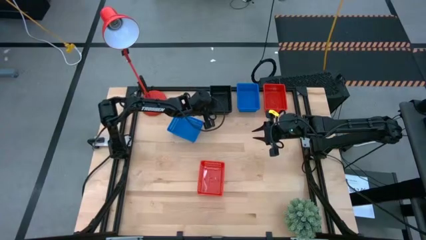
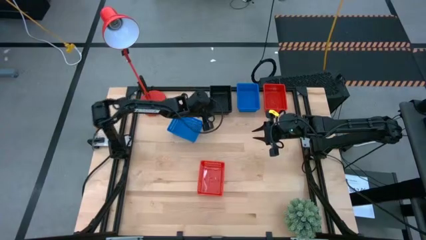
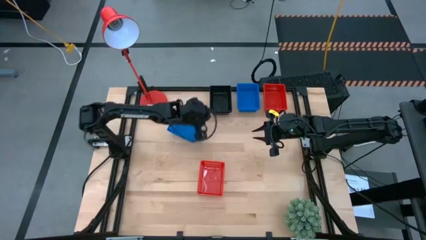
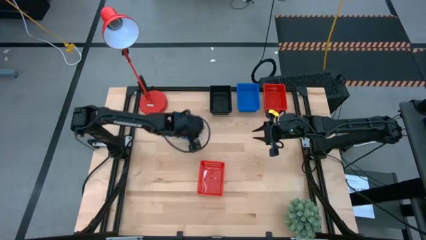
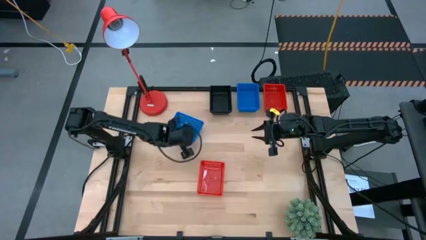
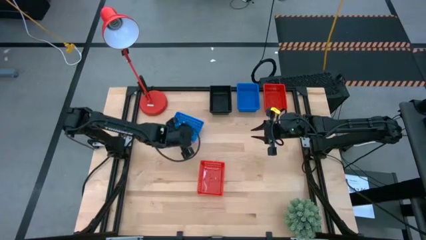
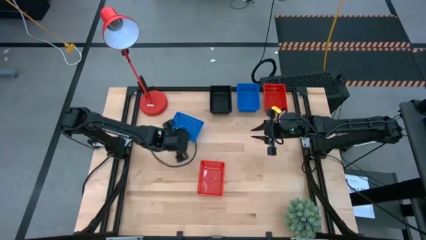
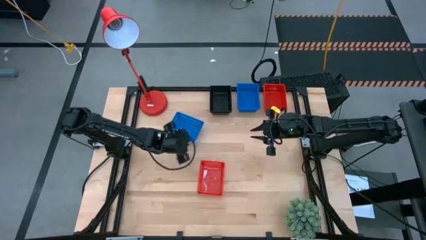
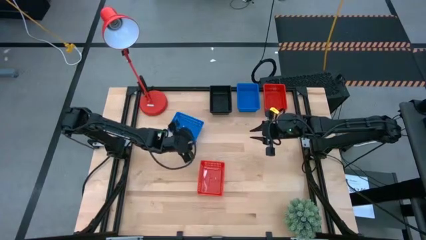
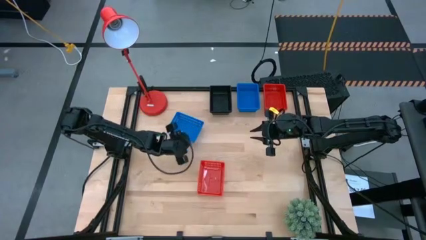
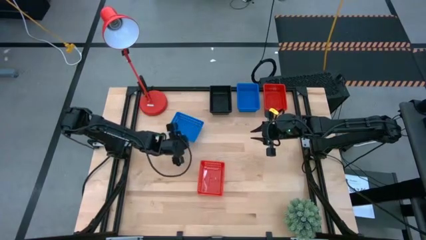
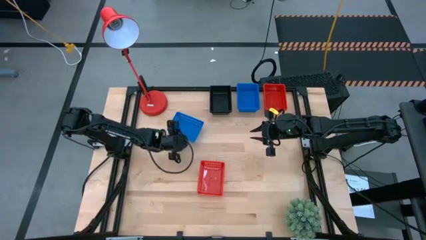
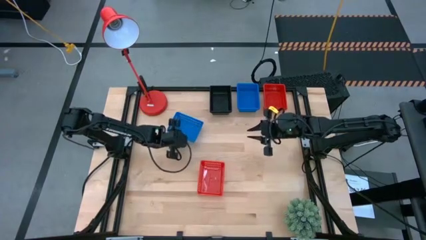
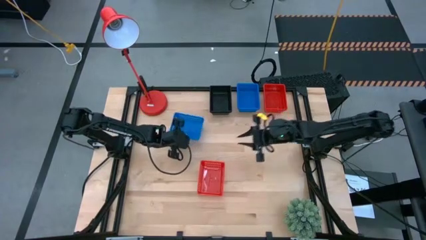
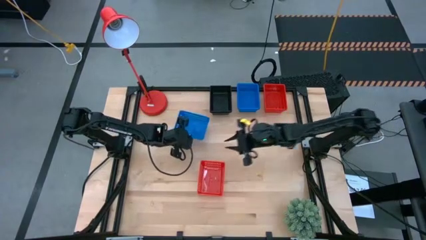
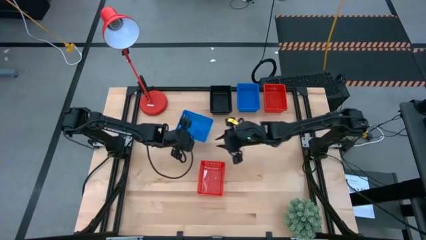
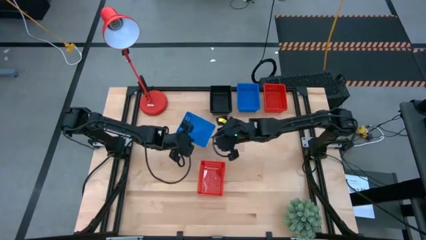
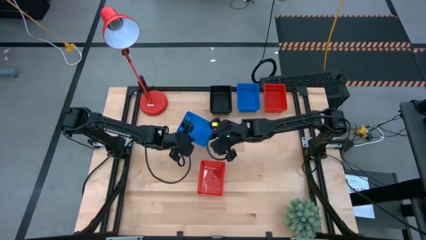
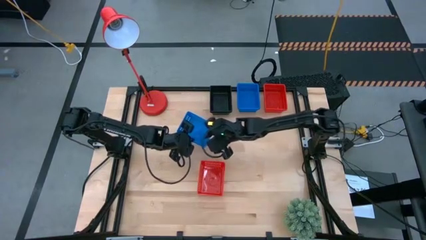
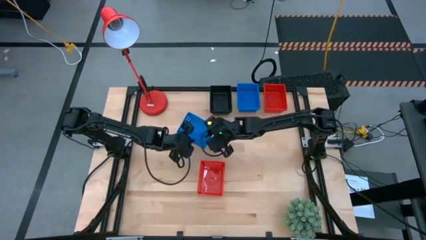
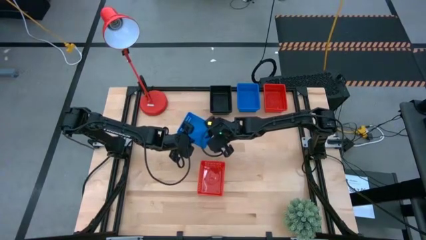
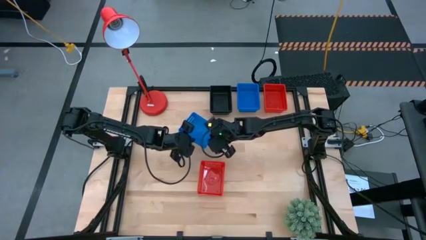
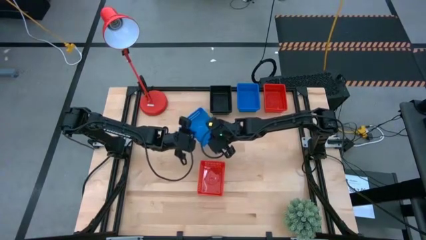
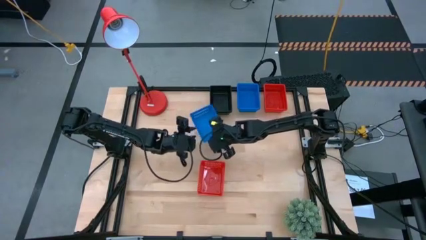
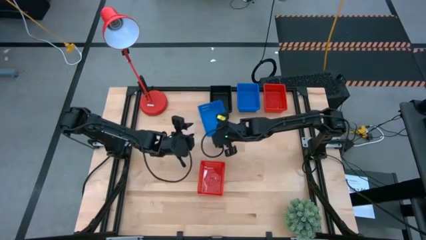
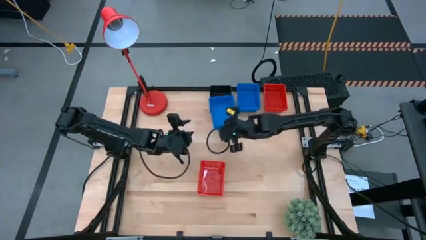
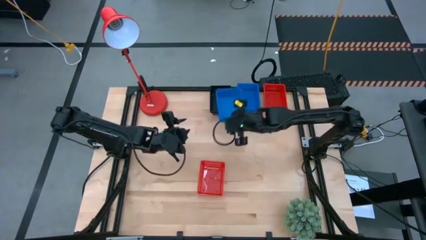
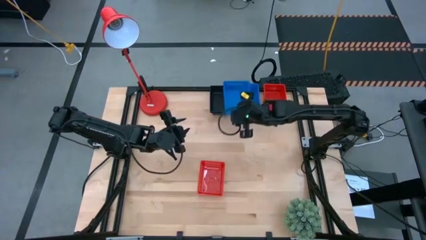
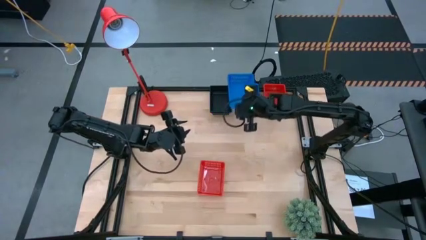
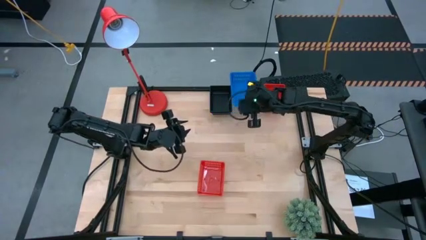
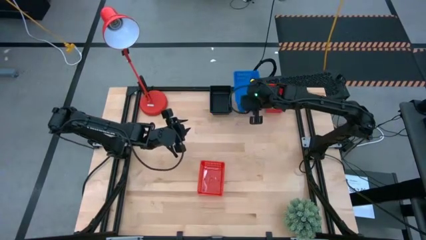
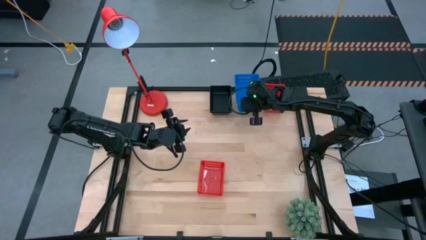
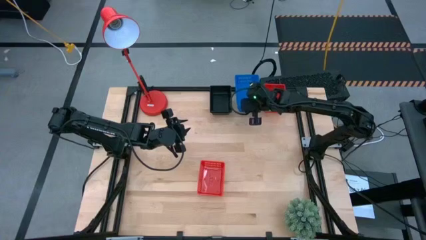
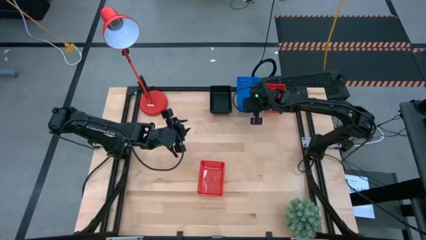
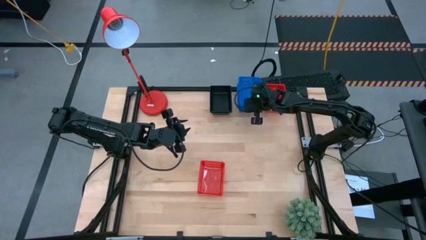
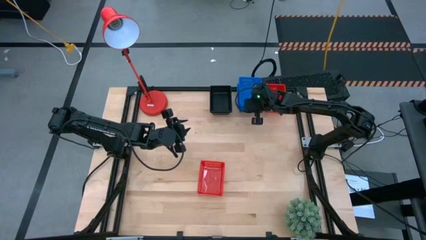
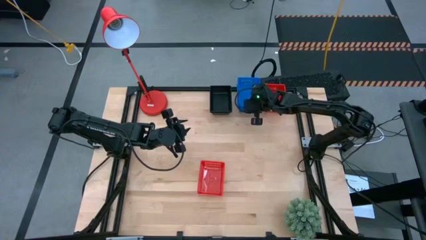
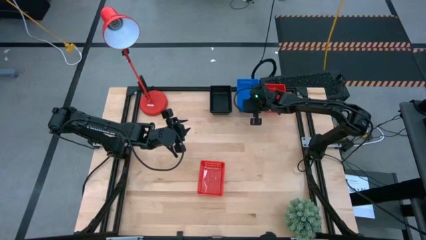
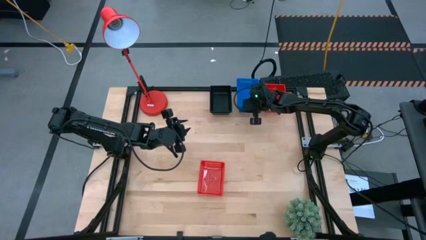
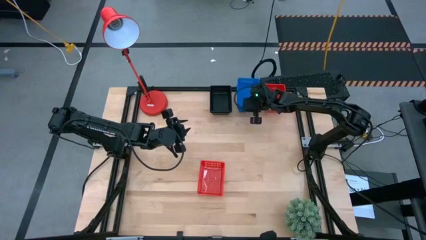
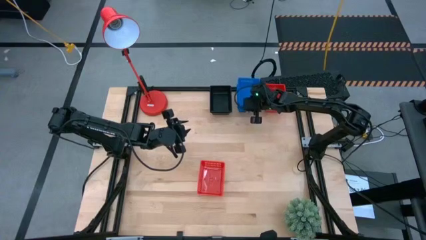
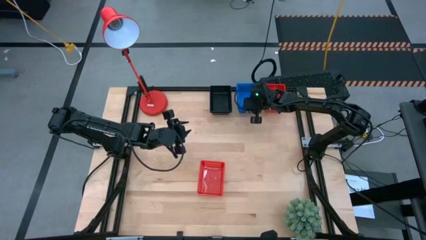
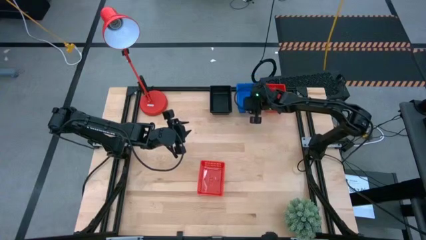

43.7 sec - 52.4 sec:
Stack the bottom blue basket on top of the top blue basket

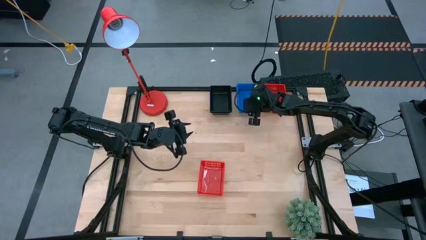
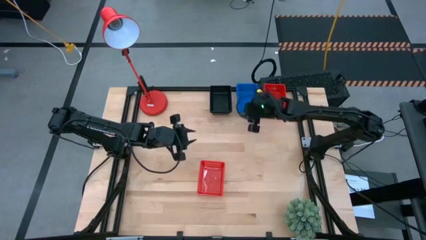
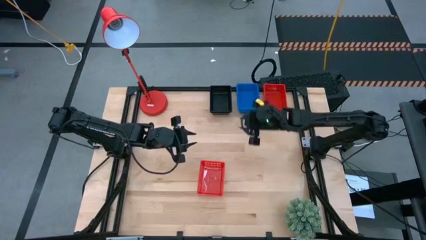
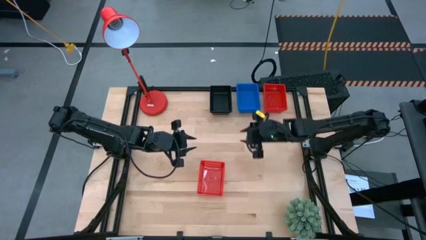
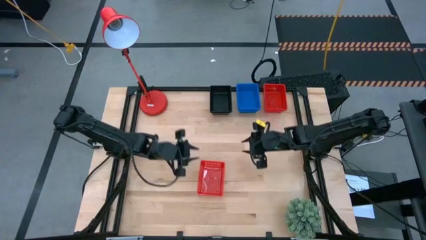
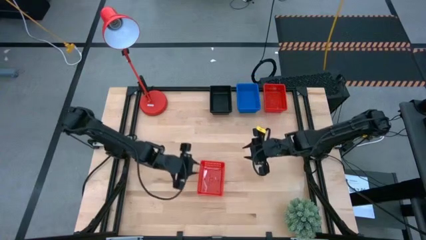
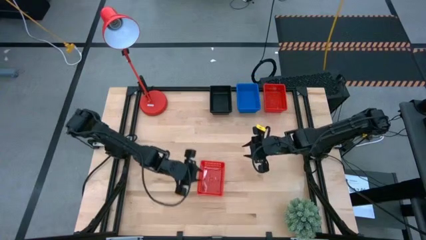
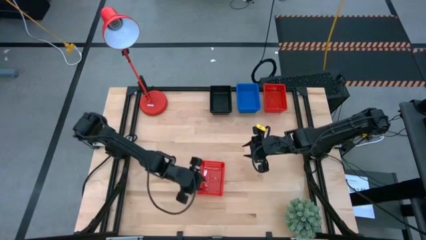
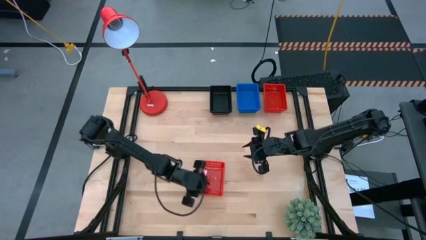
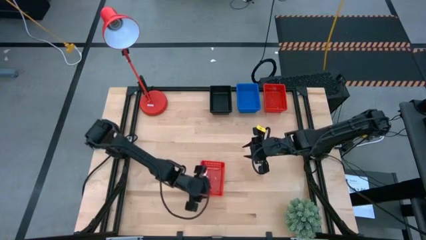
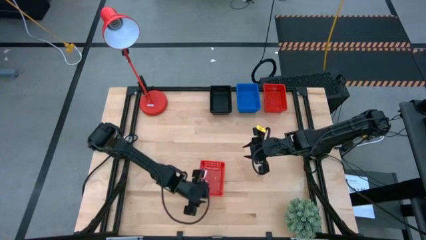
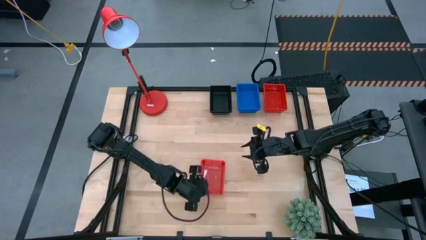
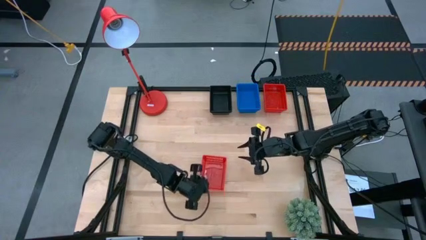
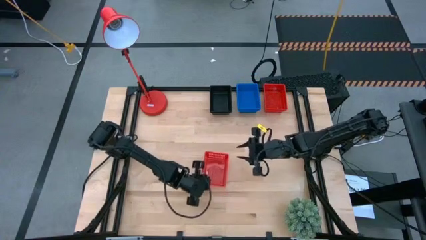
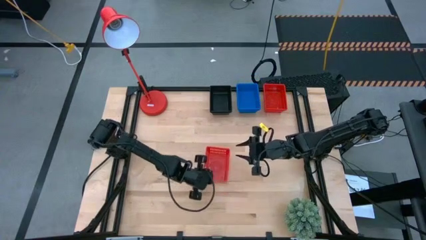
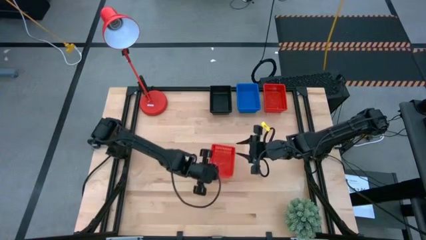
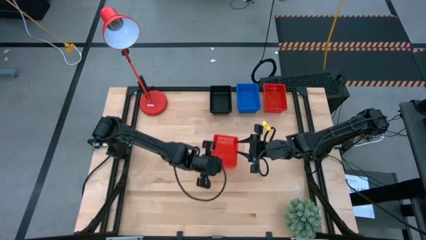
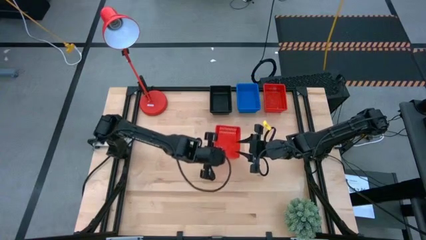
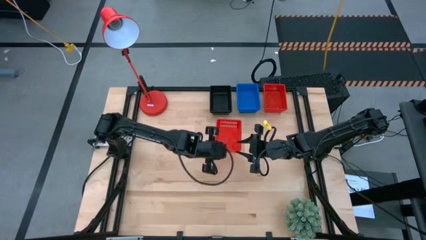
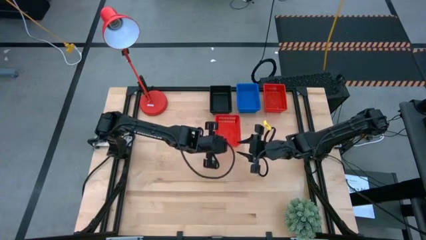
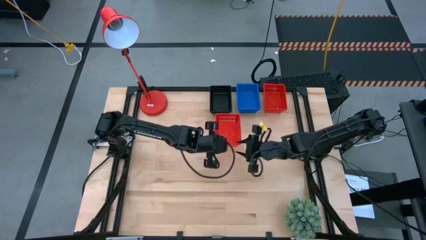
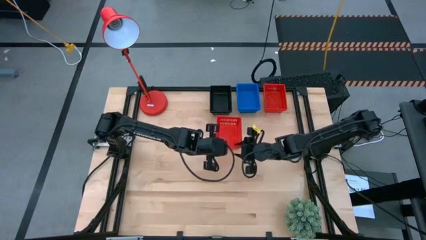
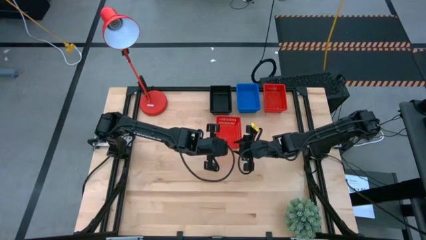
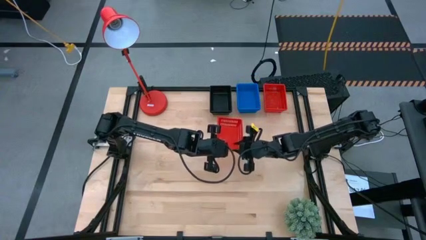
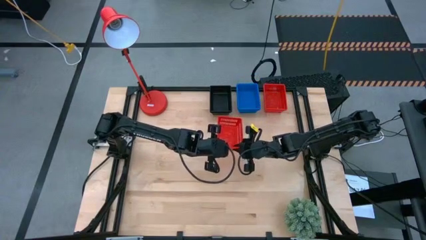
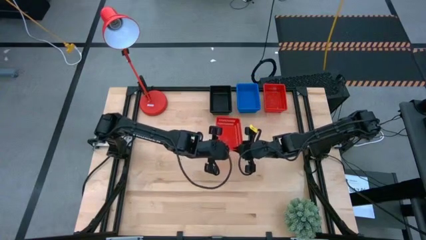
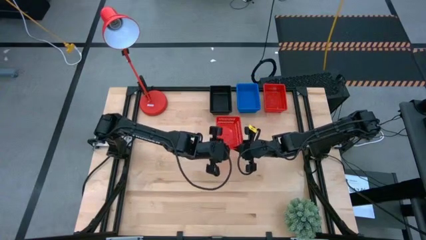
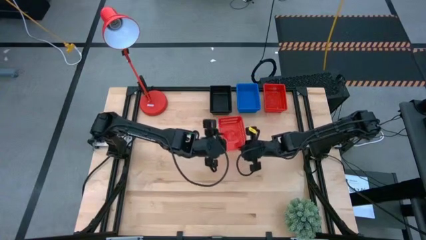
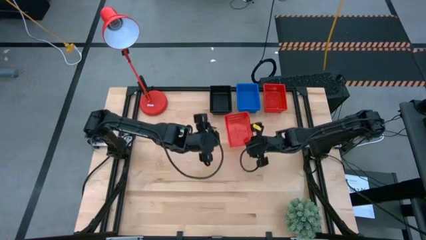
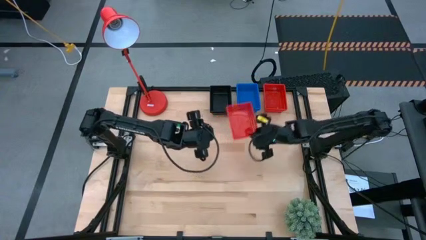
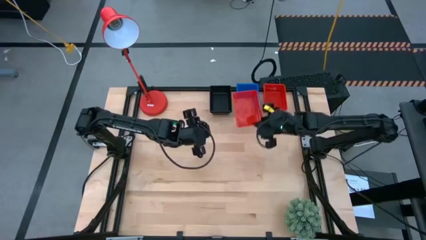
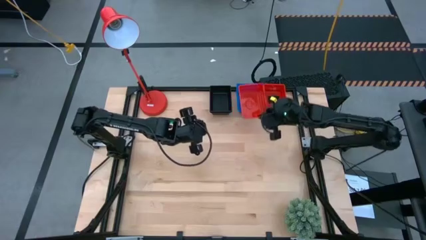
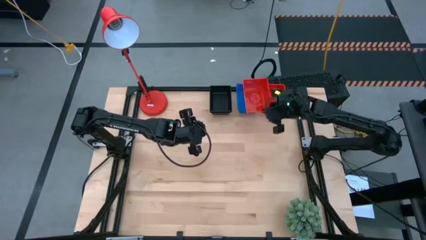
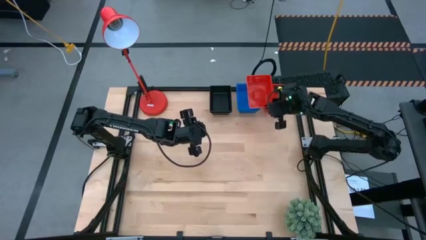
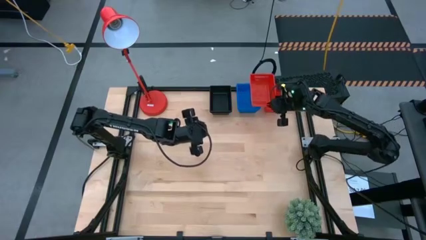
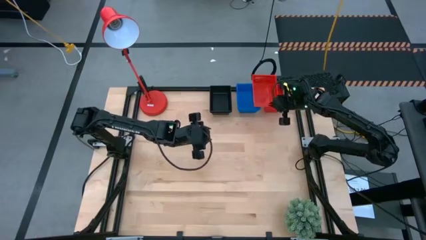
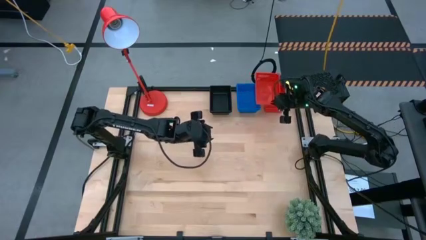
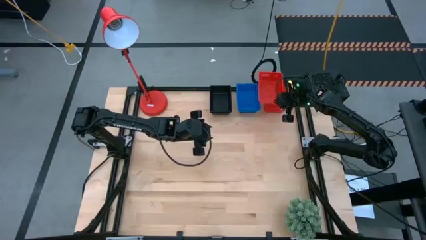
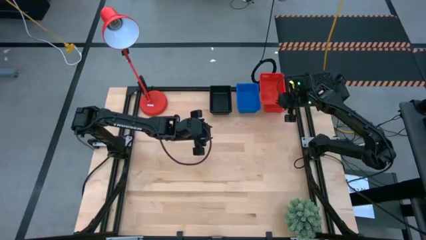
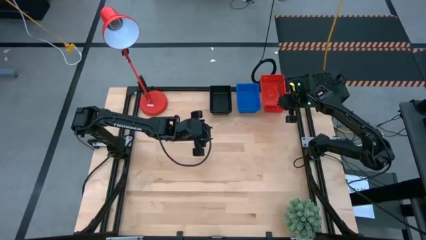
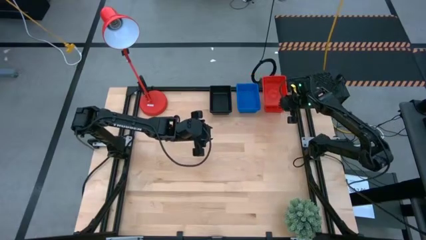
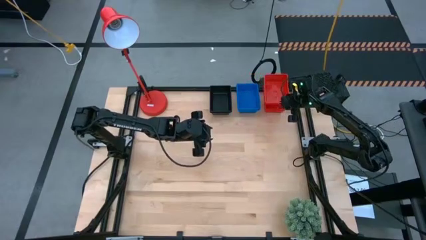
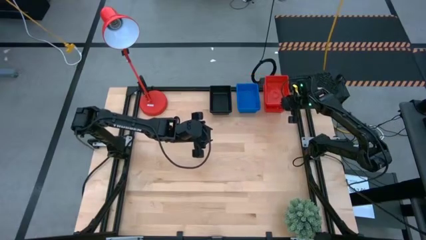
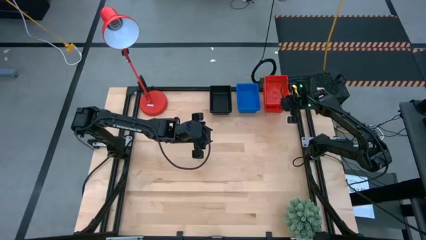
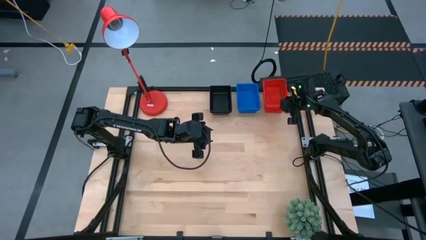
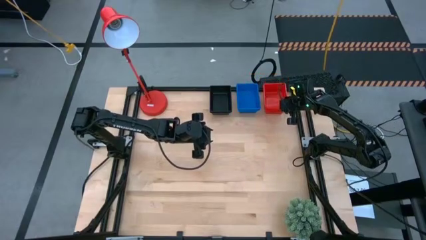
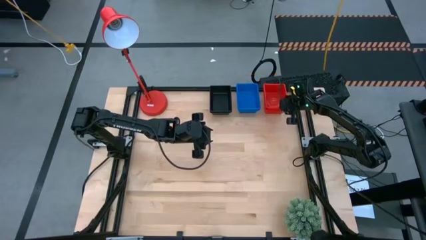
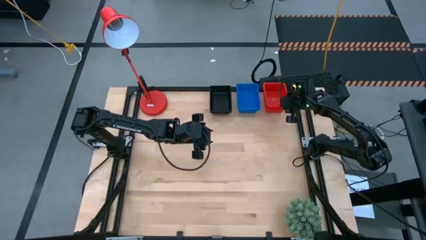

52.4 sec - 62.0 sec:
Stack the bottom red basket on top of the top red basket
